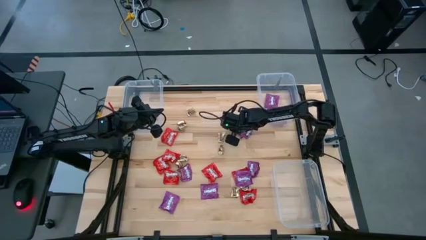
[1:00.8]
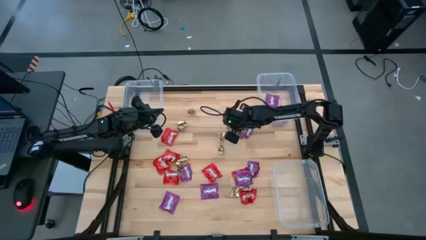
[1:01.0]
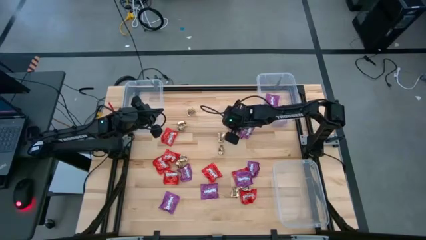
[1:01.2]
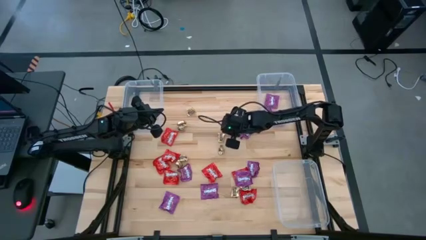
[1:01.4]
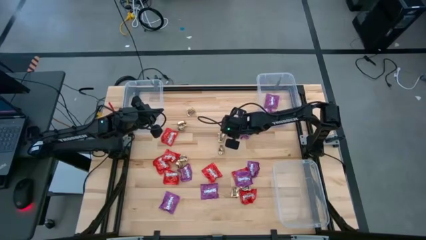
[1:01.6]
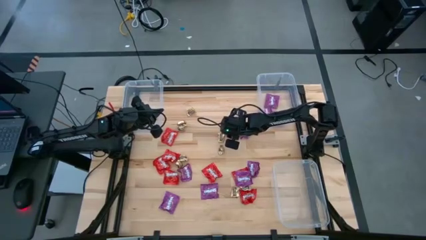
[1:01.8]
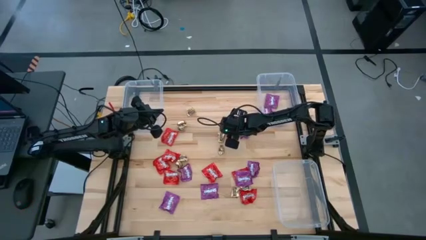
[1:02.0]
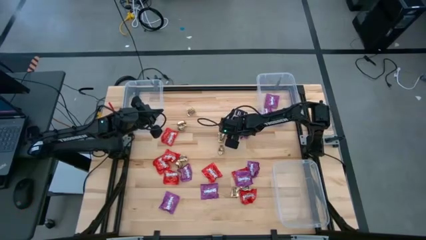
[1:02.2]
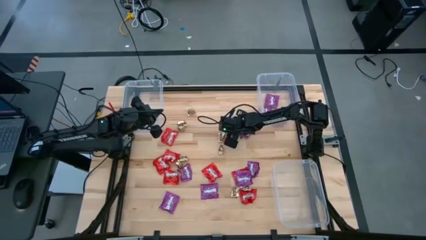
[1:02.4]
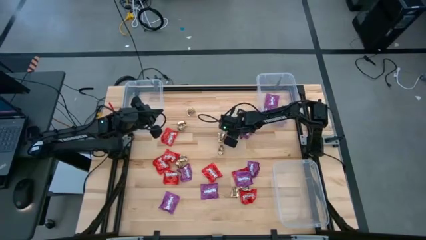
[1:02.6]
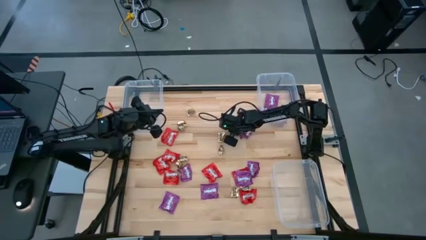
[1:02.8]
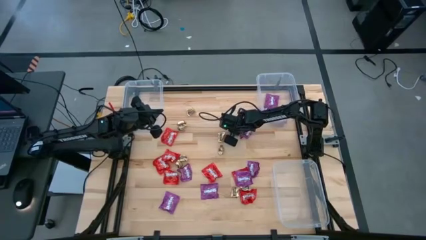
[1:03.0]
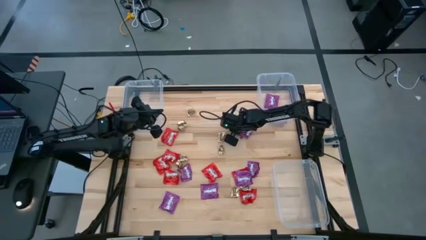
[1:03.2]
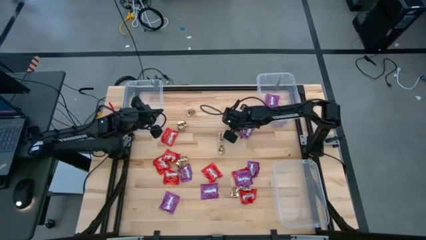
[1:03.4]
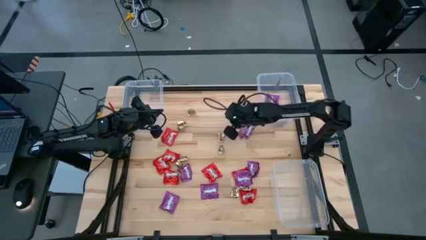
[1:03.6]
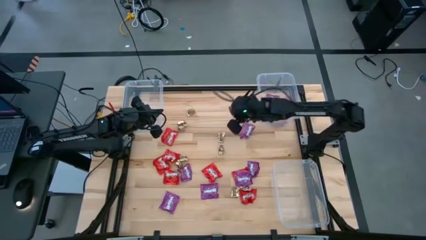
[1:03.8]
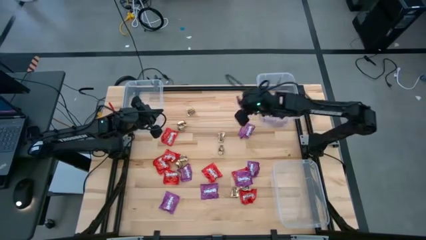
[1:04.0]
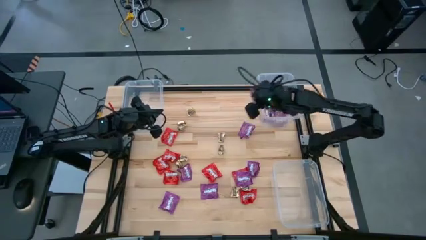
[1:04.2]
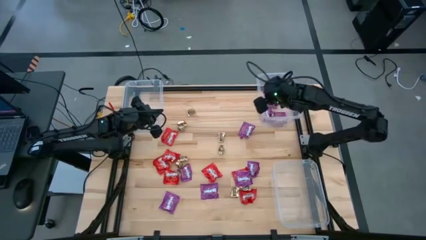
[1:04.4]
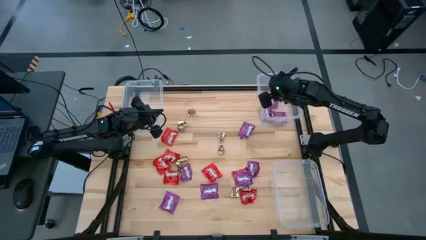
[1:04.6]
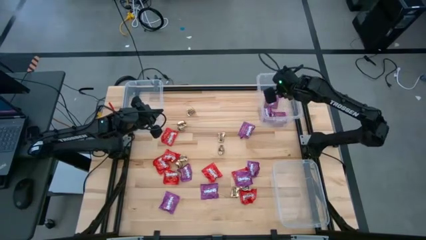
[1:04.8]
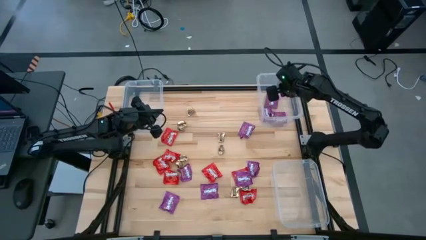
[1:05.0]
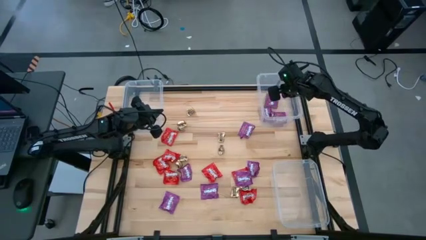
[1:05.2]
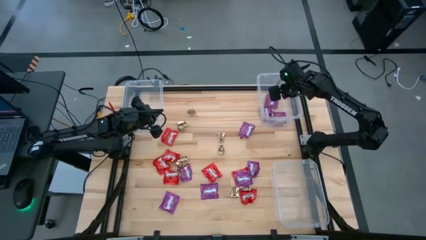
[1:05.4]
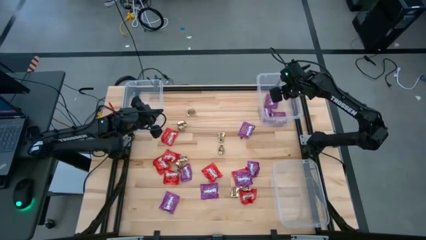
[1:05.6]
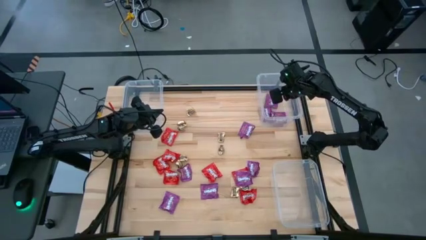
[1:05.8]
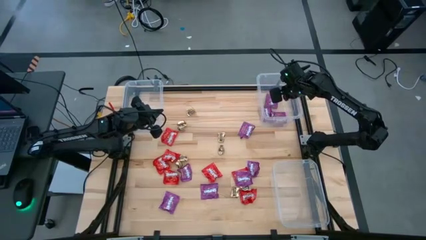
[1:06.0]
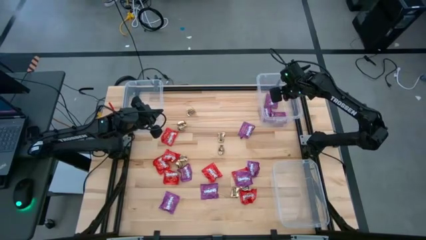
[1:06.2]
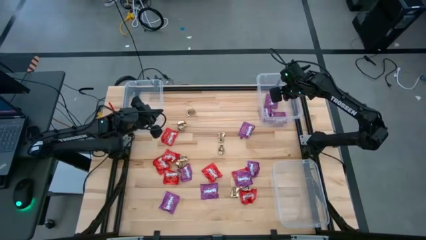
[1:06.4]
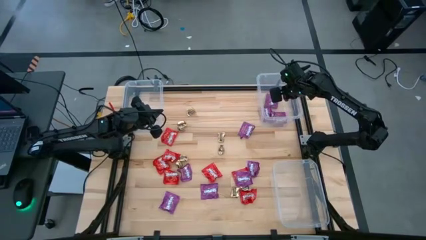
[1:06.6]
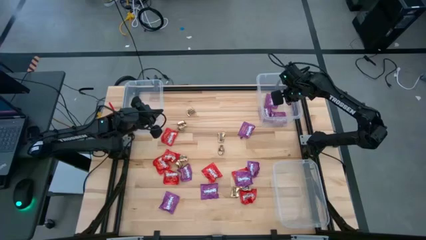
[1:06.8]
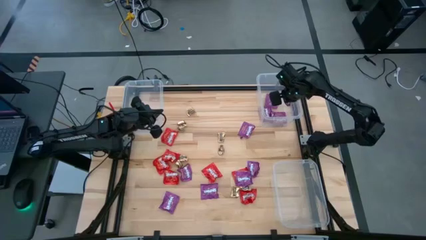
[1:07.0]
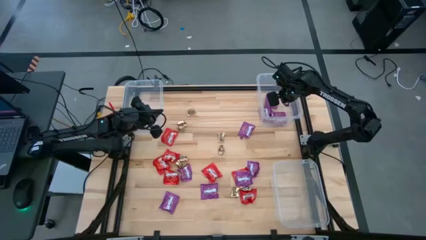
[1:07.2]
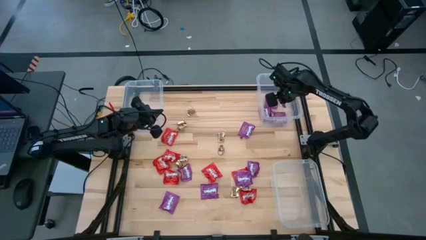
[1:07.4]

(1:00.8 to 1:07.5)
Task: Sort candy
Put the purple candy into the top right transparent bin

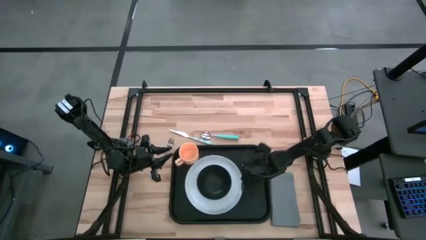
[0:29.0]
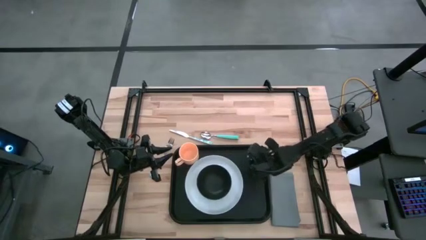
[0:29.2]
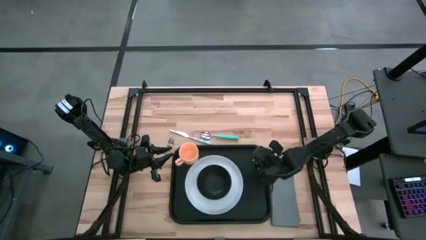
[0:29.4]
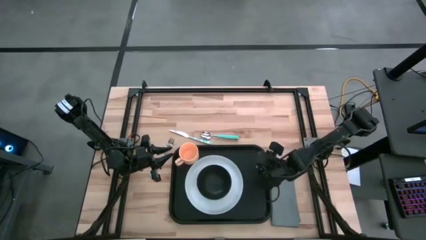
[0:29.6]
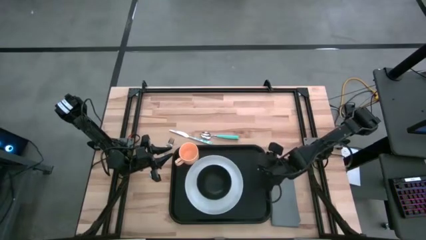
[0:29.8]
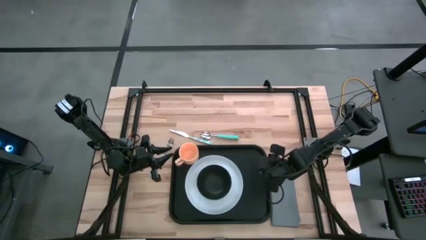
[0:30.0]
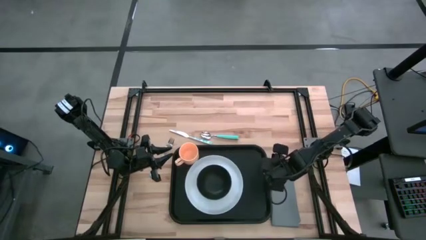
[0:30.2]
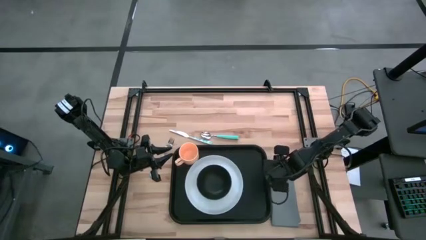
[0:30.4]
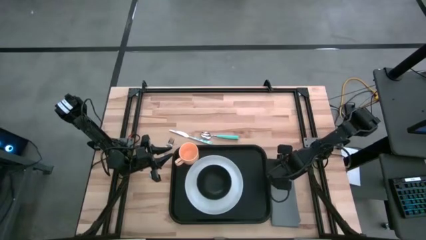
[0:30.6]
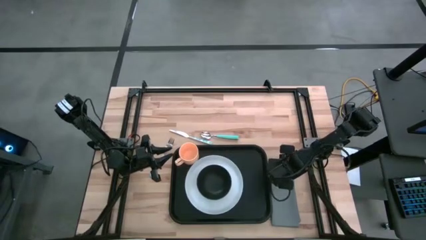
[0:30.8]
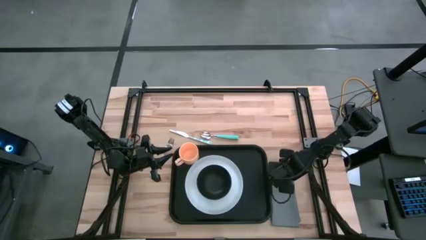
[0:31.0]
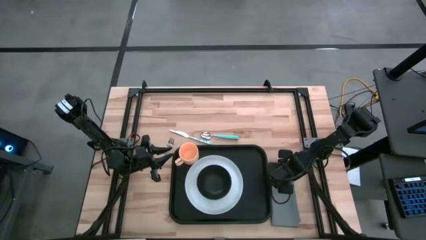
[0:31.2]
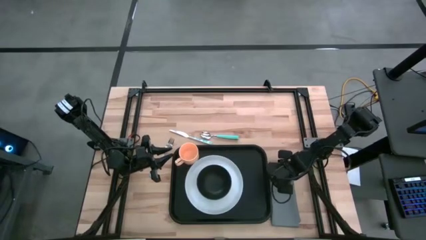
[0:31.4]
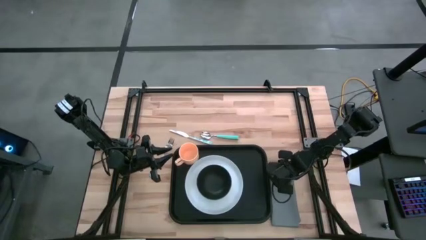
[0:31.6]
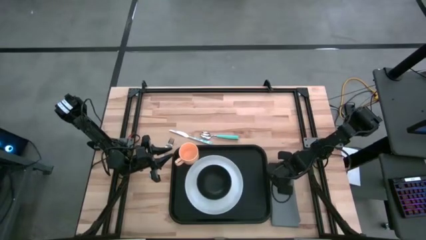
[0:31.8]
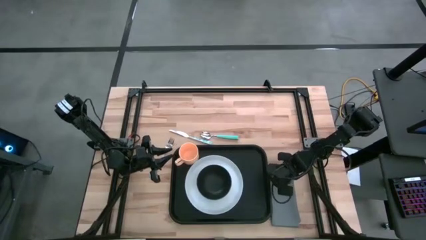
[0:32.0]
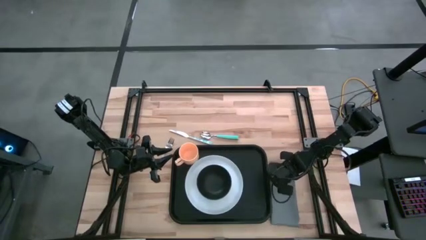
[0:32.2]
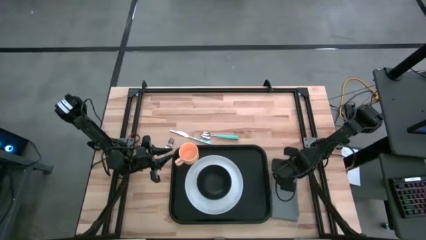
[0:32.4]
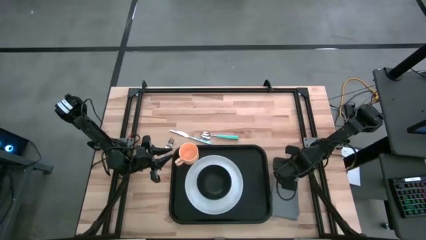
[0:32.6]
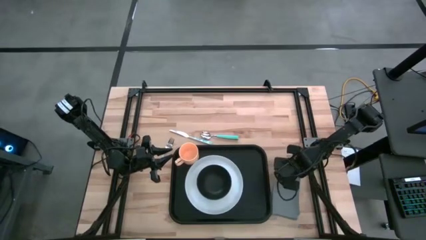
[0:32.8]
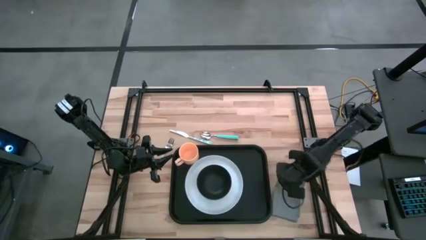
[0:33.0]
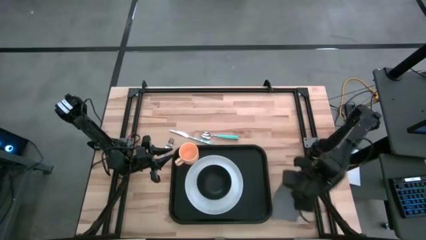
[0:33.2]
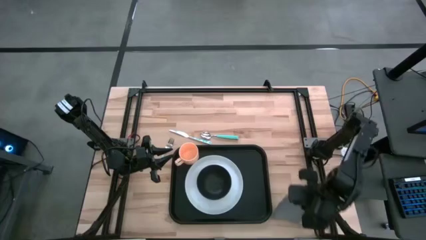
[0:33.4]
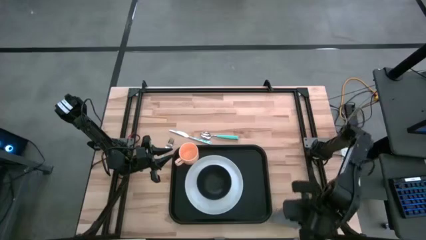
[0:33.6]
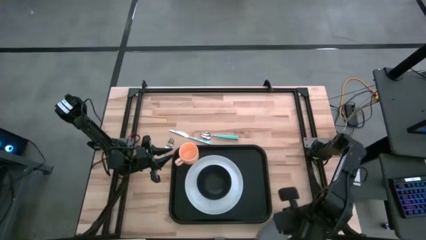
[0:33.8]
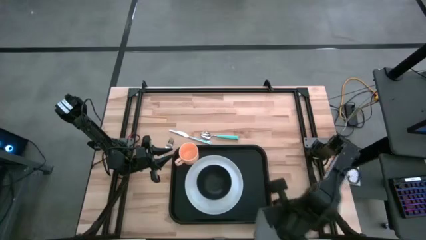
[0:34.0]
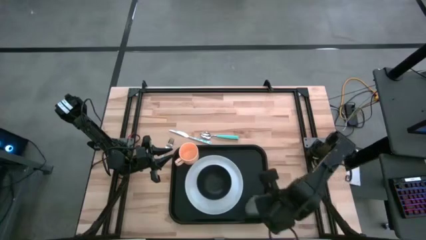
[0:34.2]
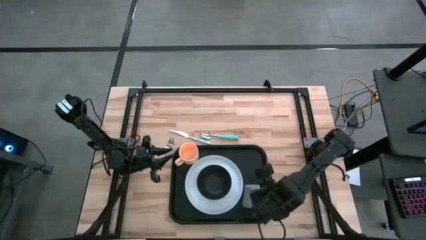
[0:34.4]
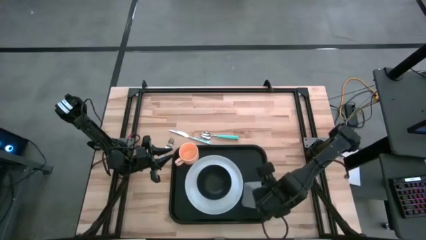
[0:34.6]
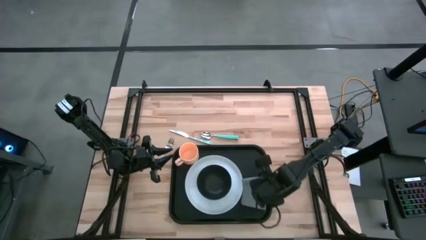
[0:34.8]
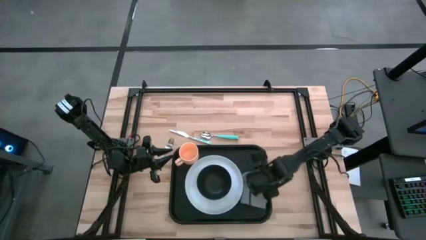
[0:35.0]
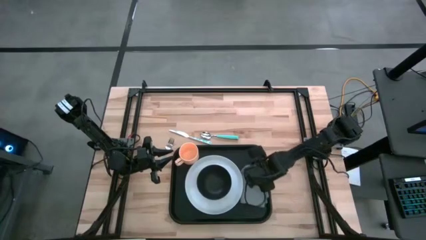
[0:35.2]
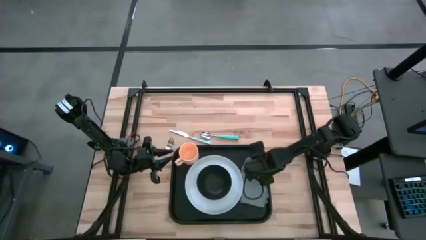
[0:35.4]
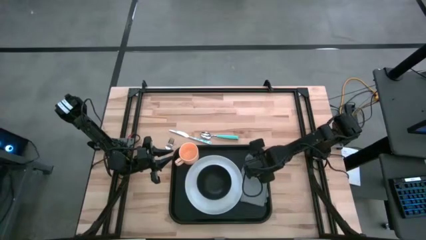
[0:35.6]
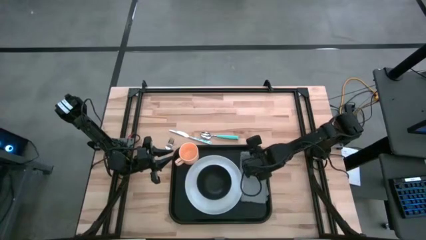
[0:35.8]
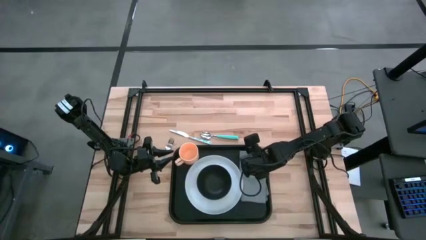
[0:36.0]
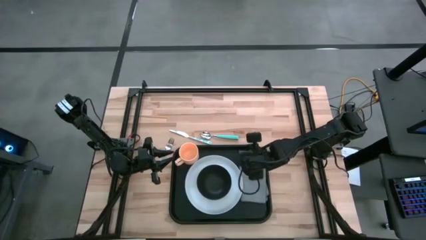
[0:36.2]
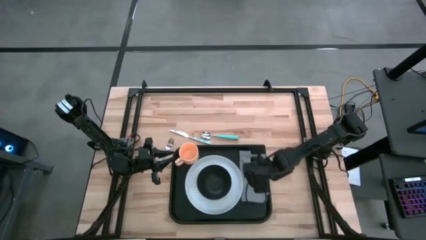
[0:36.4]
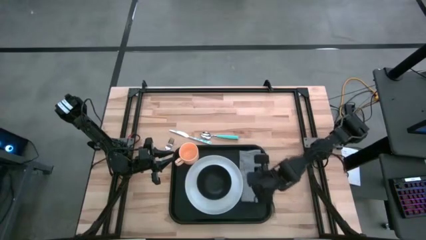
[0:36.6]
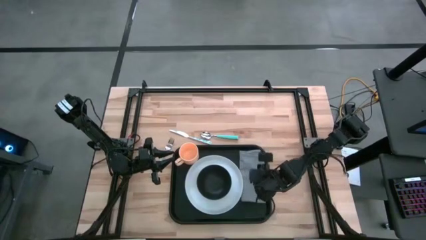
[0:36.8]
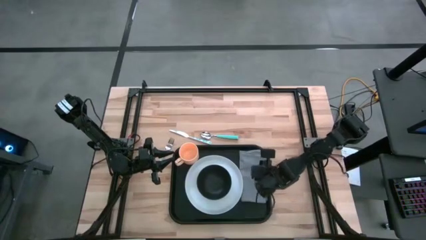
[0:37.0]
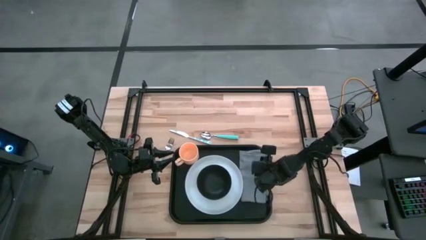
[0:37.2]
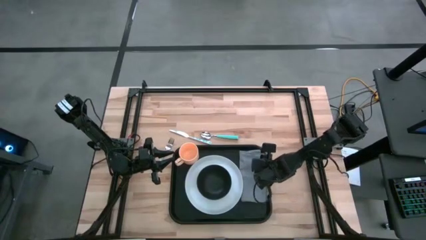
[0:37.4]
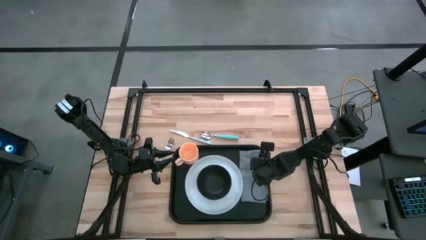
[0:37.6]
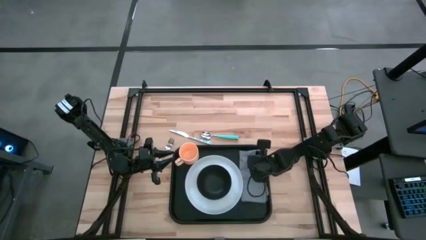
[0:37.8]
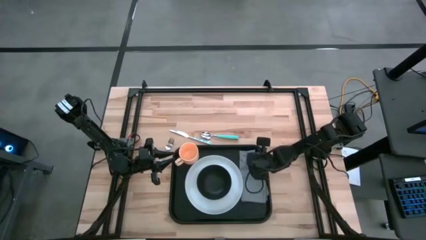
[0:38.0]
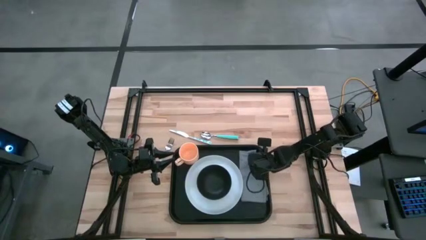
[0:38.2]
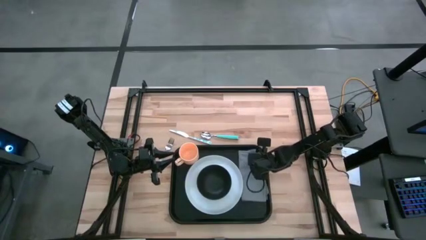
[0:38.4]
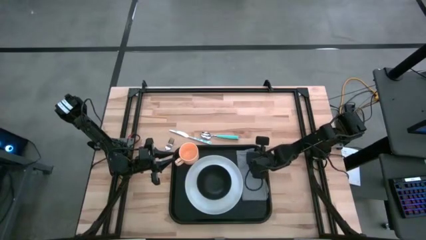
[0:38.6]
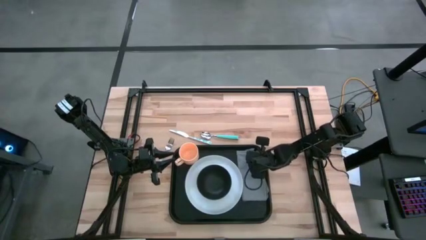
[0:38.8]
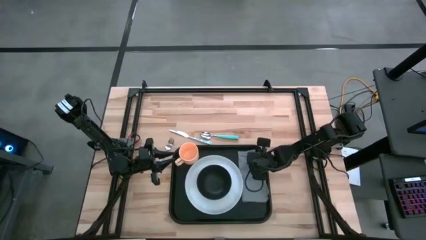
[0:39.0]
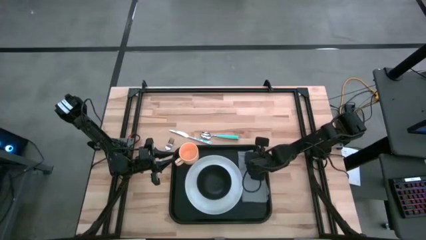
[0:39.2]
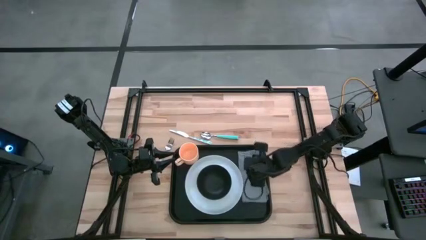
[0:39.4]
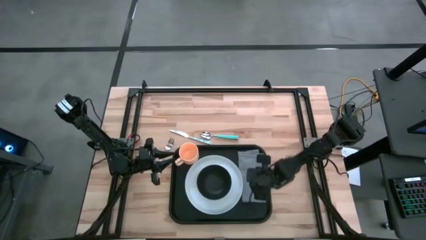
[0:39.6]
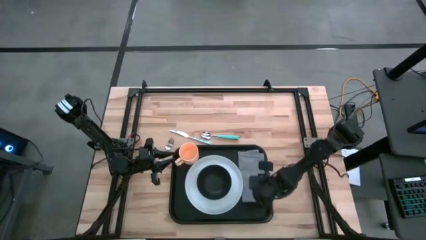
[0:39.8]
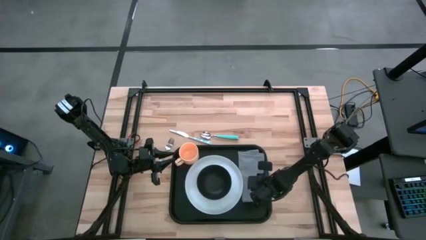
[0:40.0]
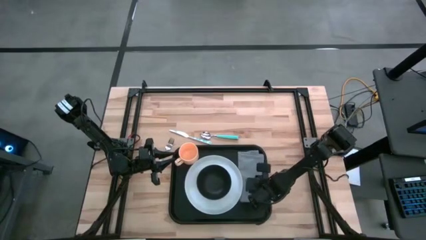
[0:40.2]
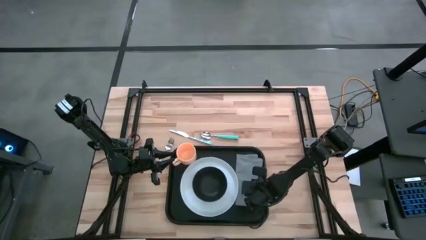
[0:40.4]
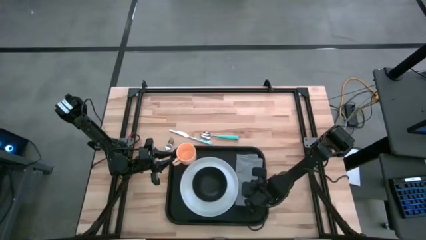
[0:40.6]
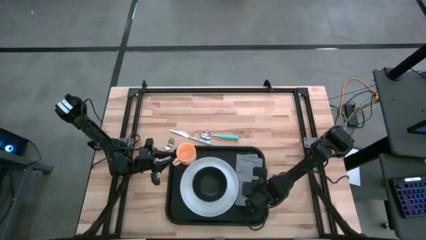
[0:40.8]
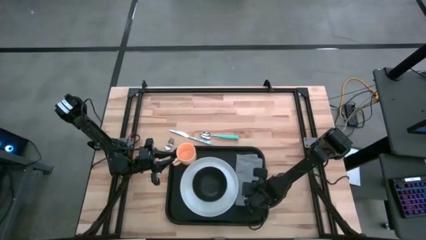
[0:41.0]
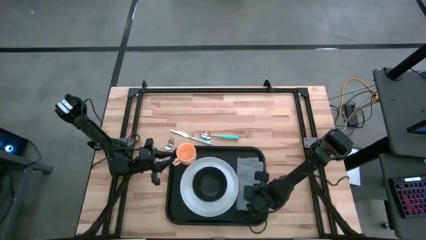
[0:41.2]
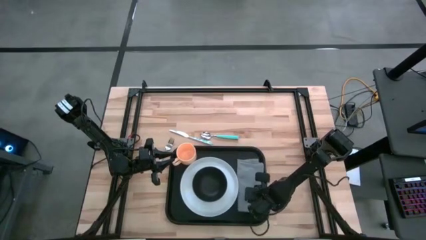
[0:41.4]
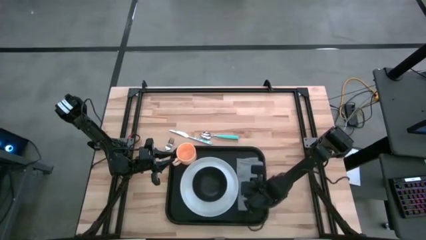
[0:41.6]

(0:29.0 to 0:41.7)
Task: Set up tray
Put the gray napkin on the black tray to the right of the white plate
